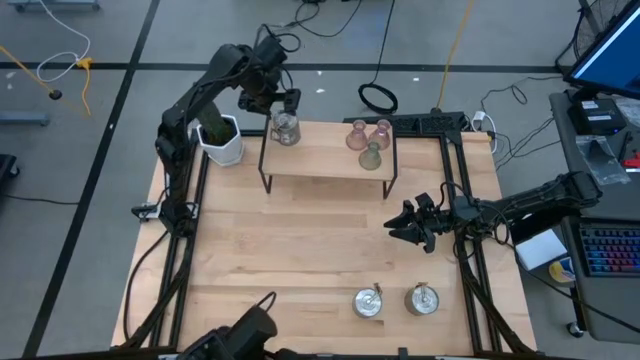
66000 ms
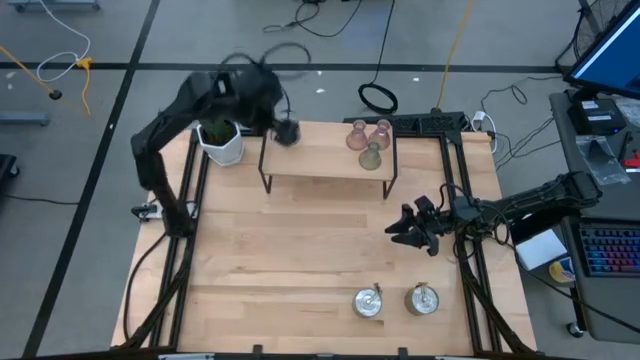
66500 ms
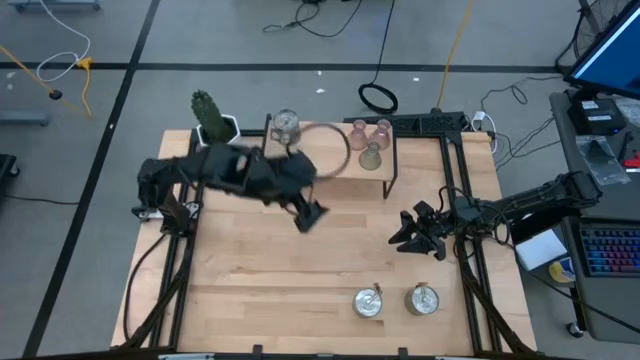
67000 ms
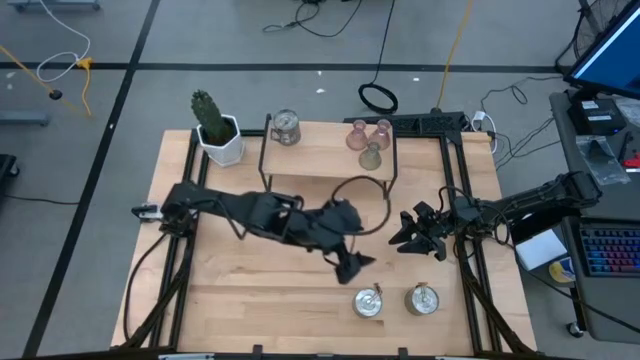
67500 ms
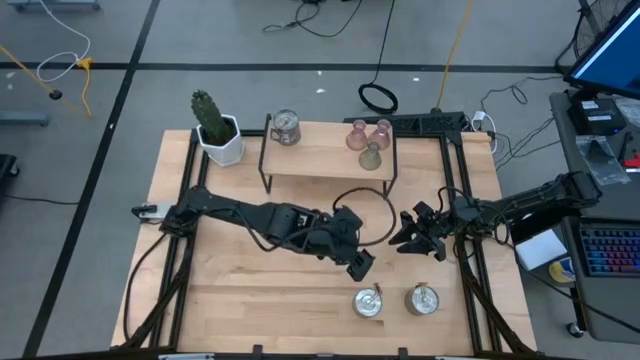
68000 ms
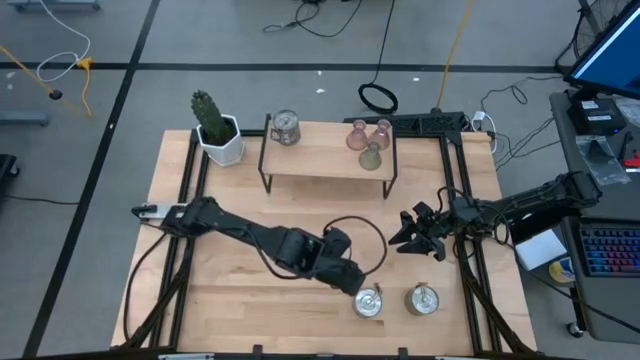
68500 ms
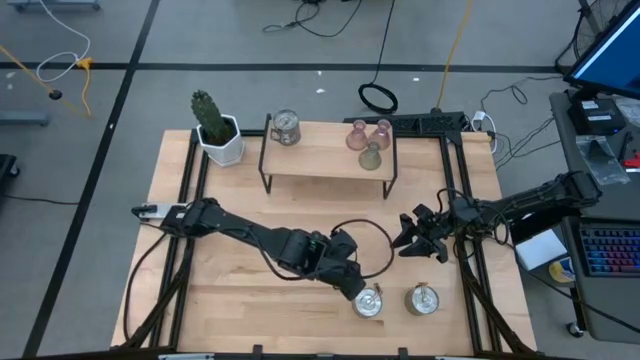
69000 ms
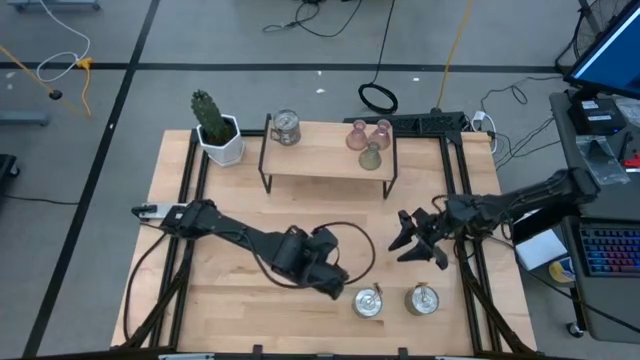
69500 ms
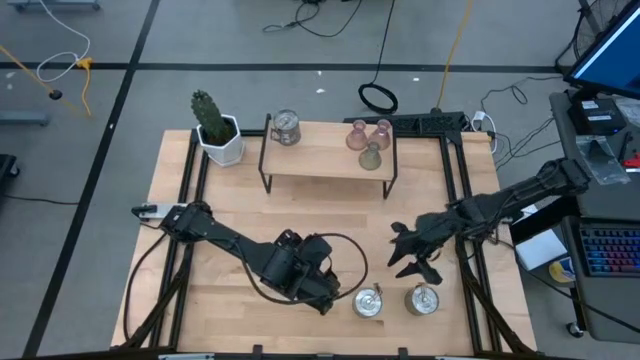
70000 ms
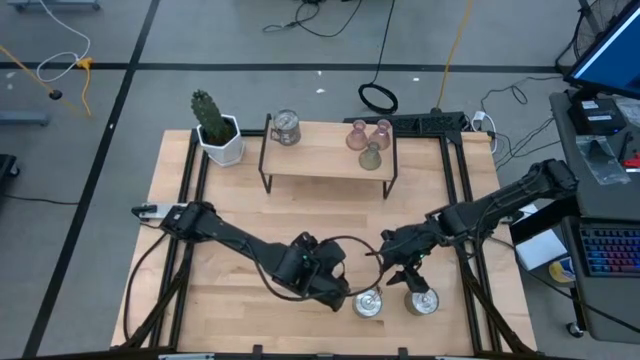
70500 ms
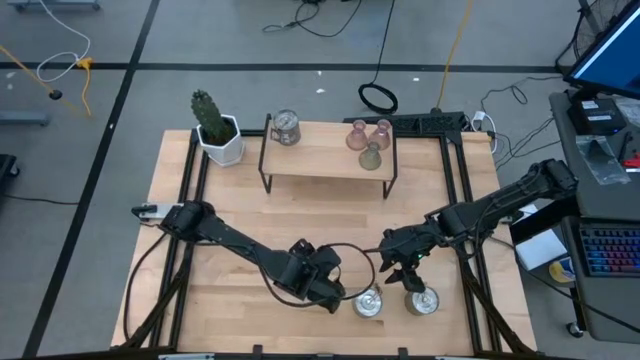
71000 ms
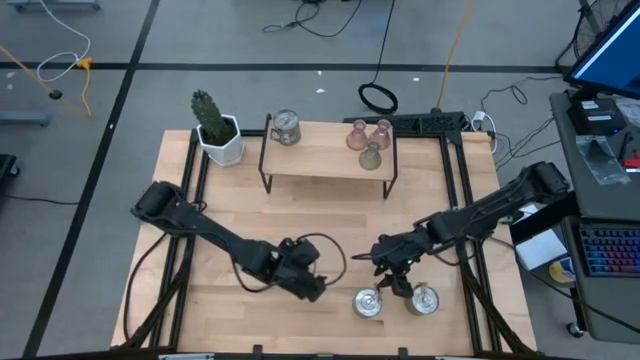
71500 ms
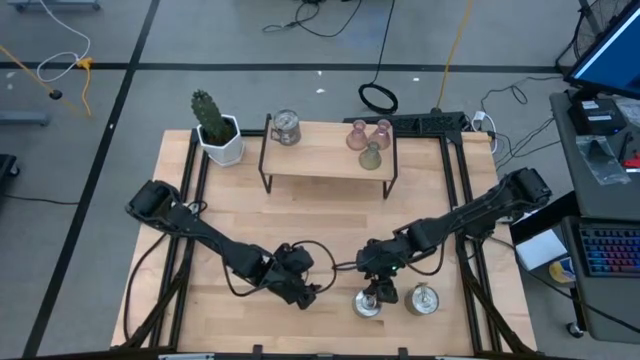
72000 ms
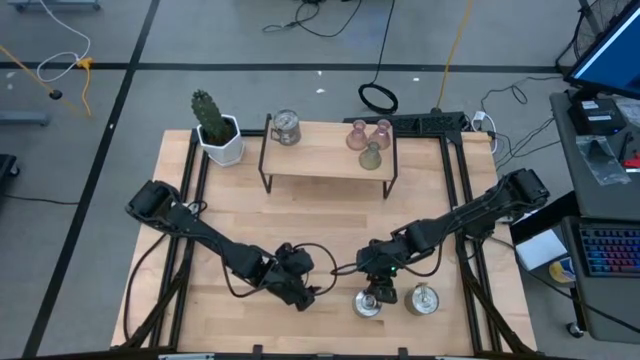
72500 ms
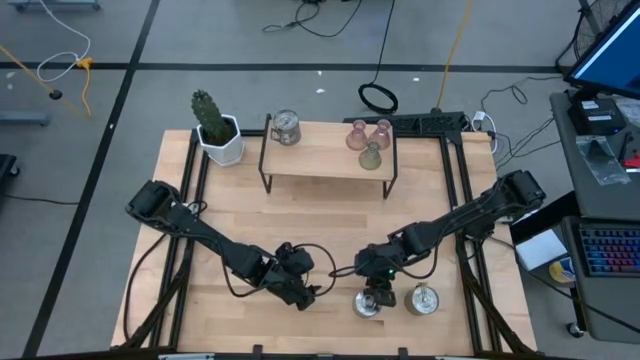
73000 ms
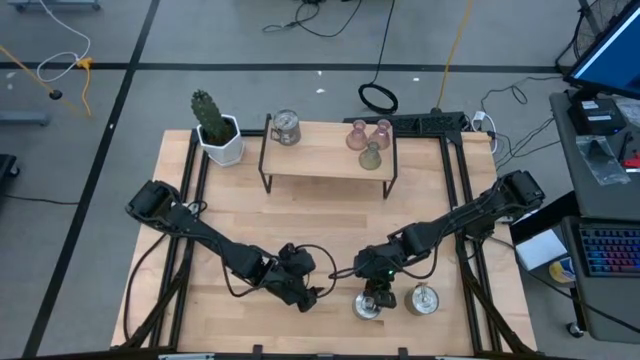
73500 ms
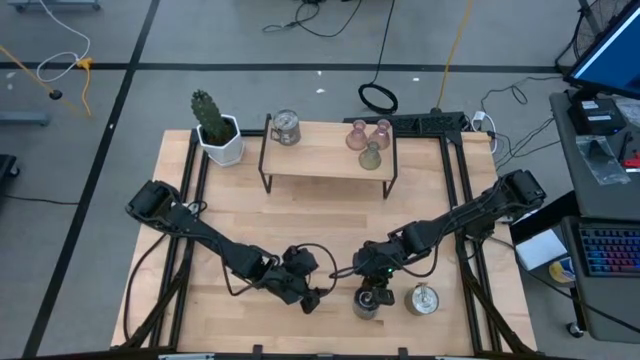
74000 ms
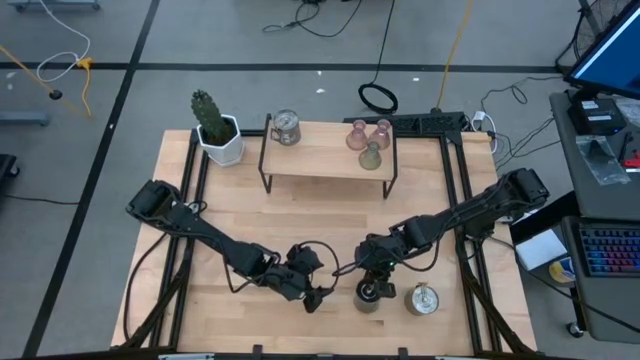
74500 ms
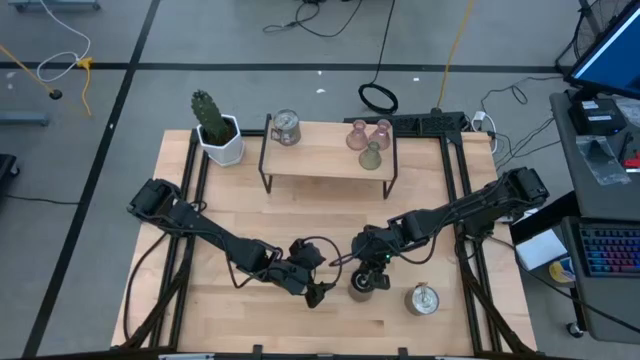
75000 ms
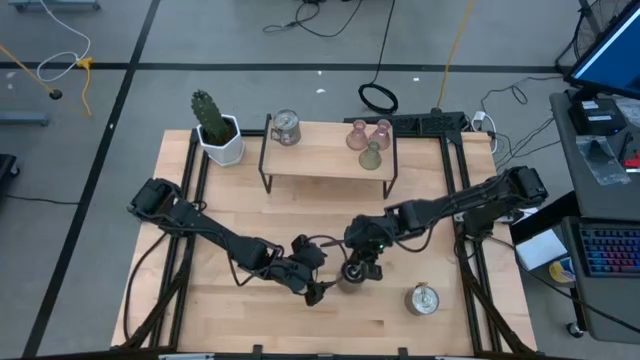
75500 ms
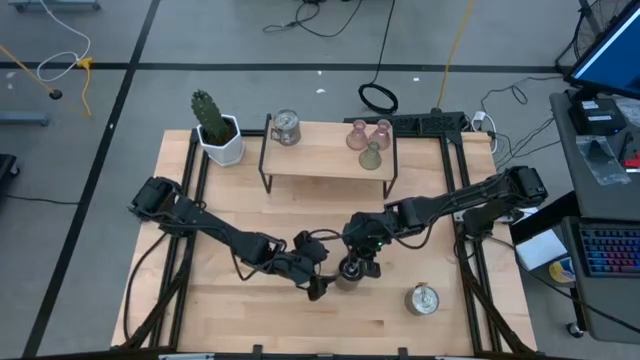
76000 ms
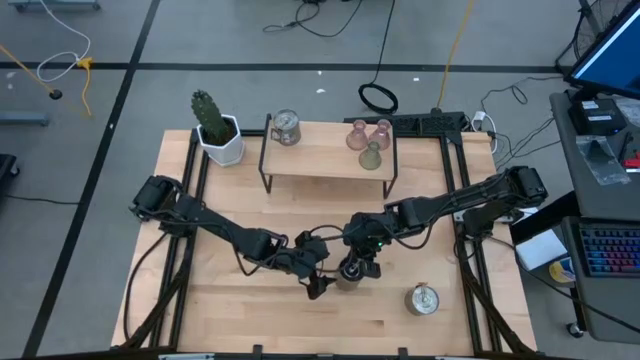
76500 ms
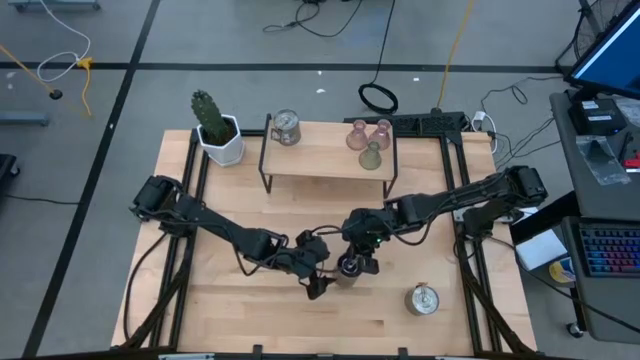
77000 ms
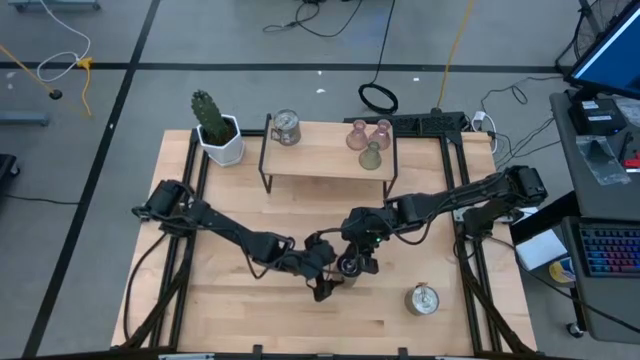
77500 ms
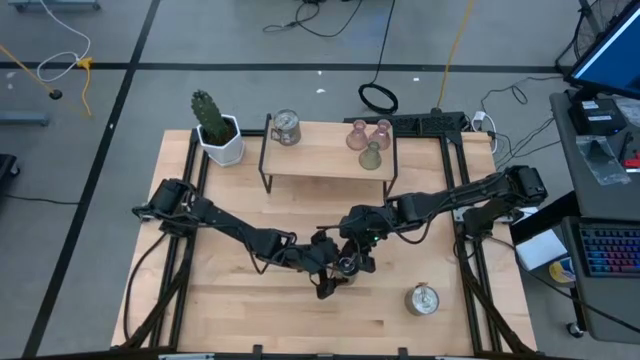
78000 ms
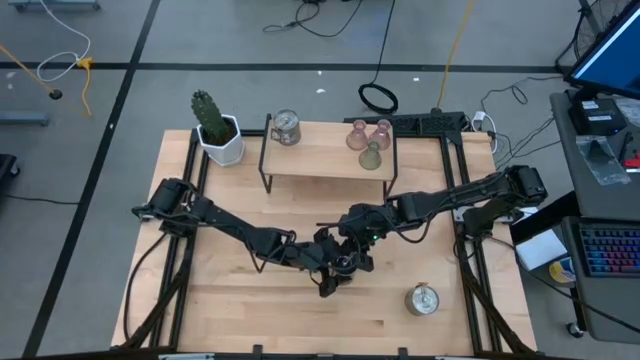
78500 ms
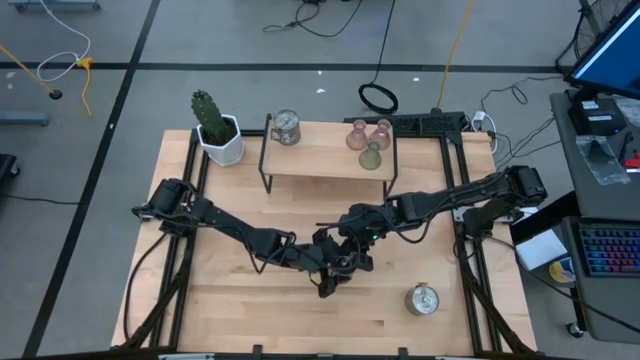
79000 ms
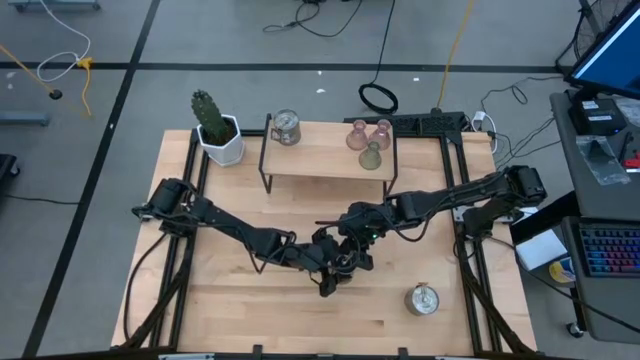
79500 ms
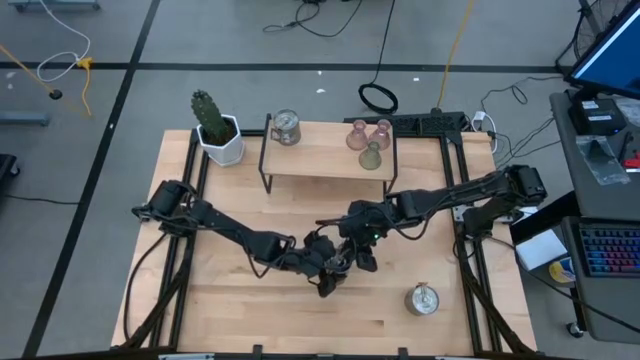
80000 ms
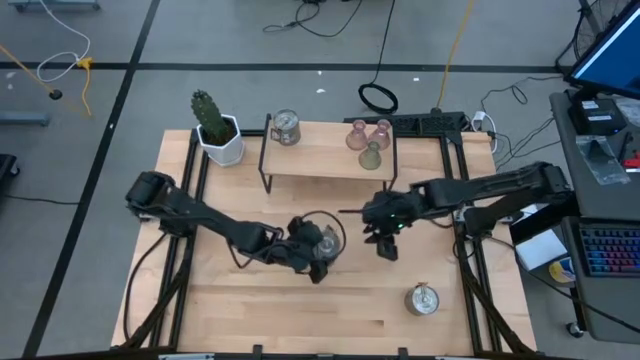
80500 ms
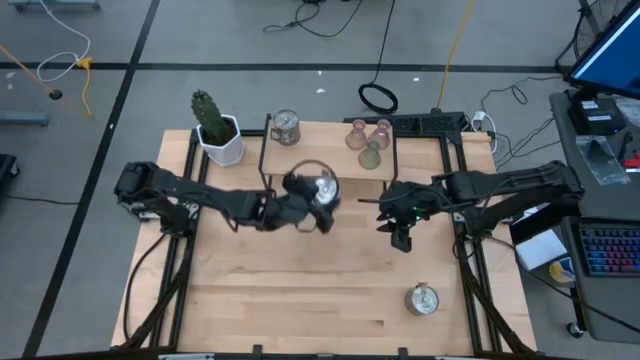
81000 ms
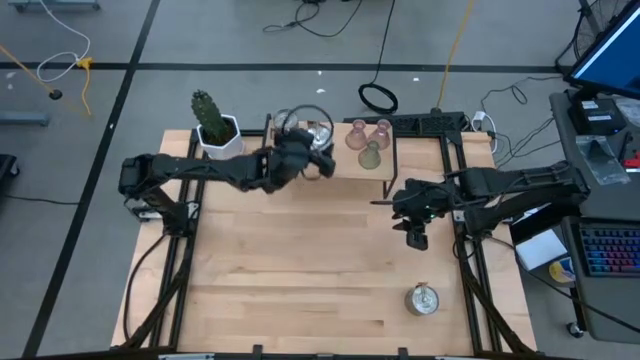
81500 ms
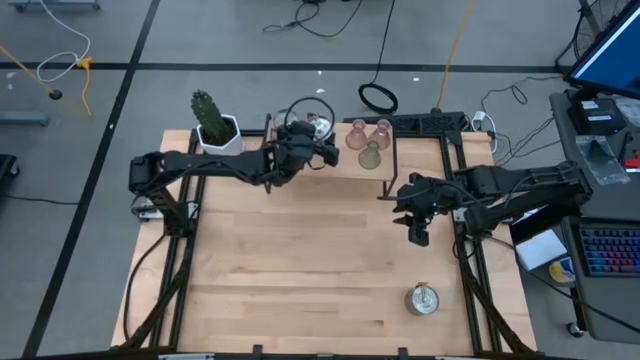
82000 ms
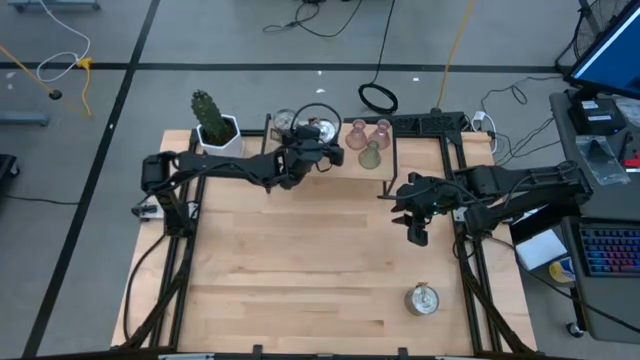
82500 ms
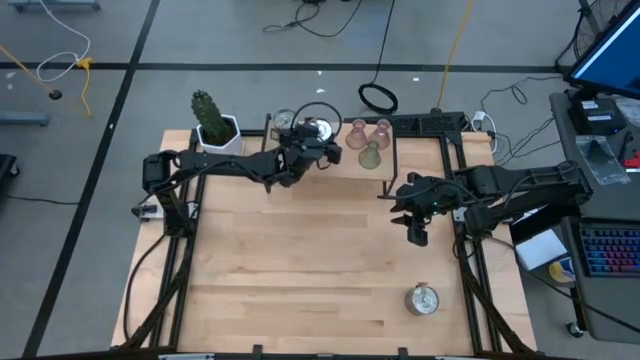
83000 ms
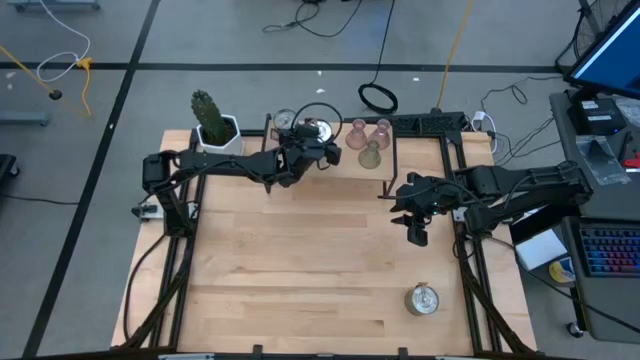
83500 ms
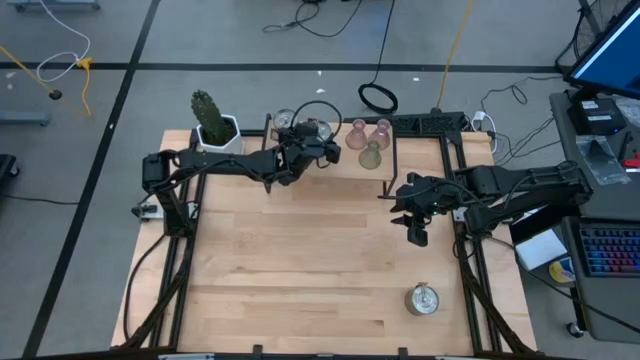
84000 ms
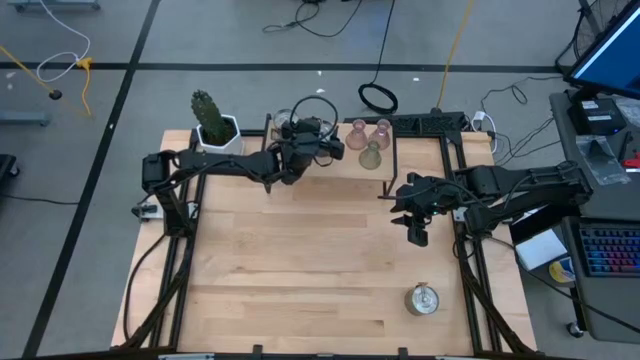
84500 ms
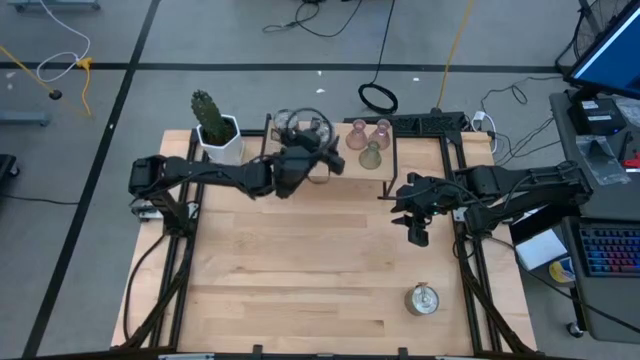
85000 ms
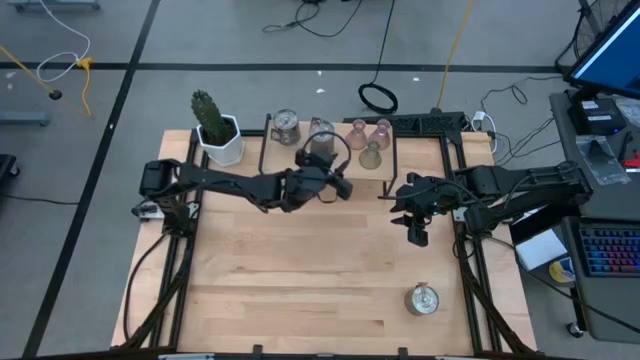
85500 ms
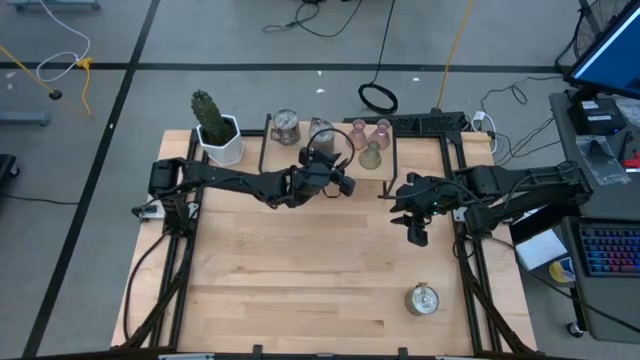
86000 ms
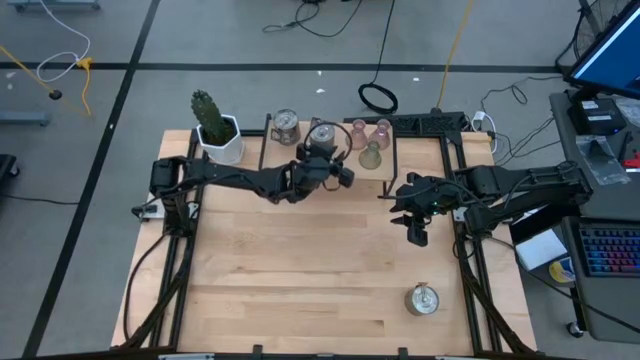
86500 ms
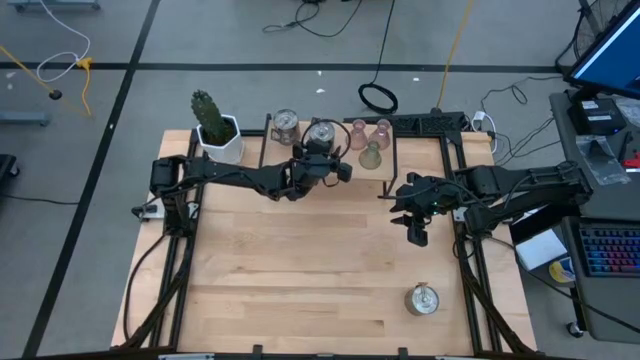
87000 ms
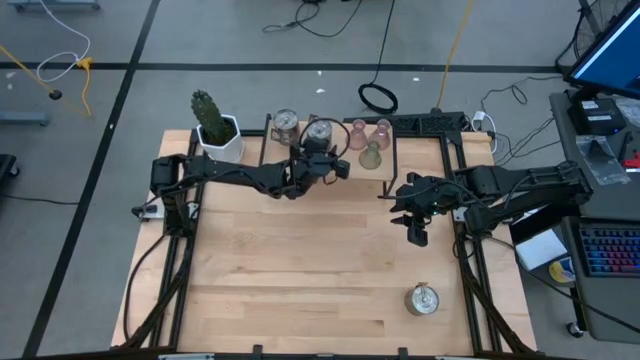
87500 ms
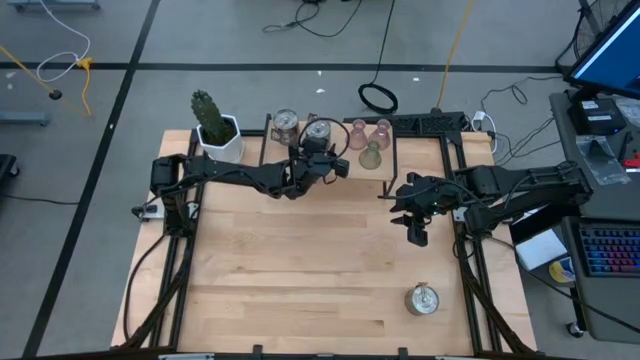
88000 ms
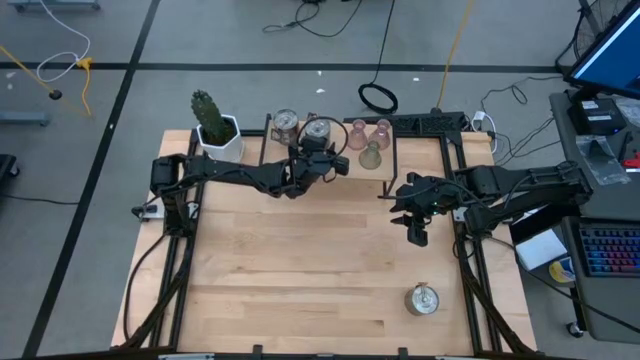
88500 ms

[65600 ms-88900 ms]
Task: Pick & Place candle stick holders
Put the left silver scented candle on the shelf
